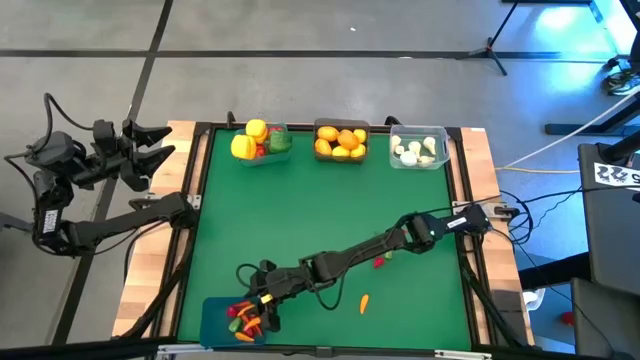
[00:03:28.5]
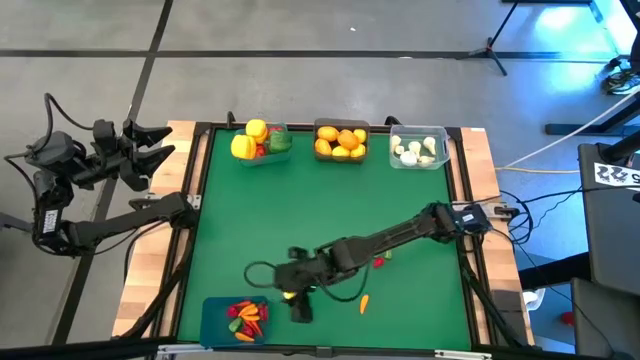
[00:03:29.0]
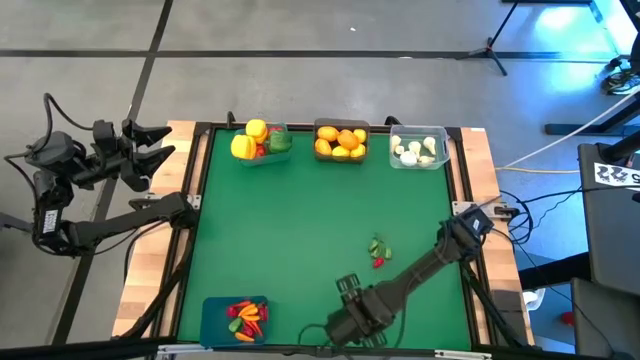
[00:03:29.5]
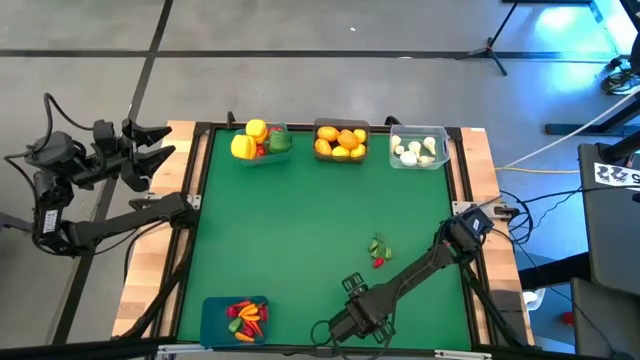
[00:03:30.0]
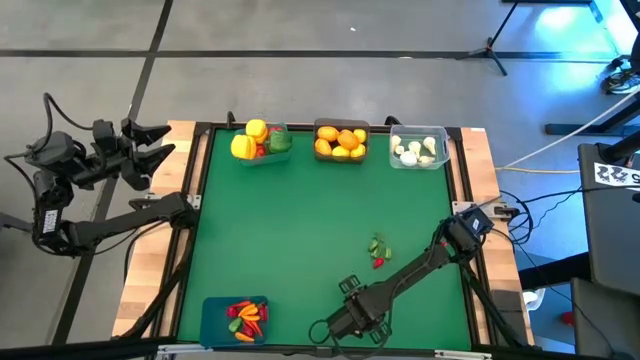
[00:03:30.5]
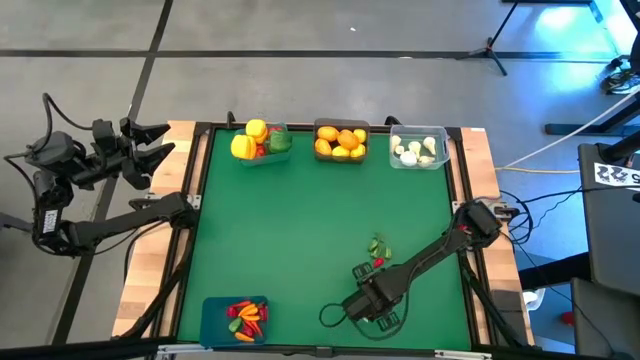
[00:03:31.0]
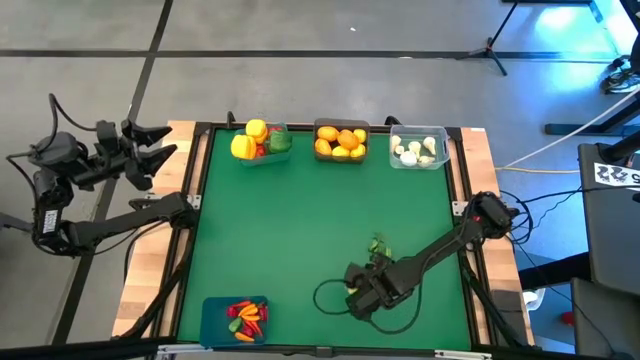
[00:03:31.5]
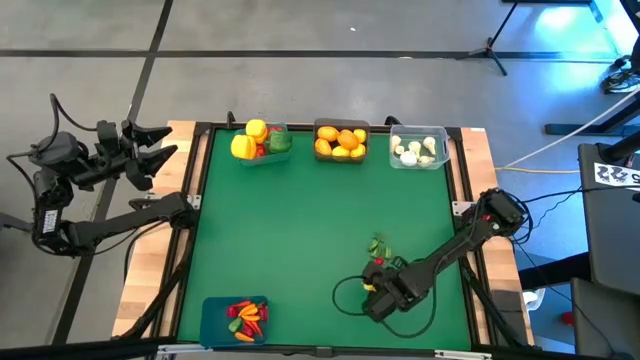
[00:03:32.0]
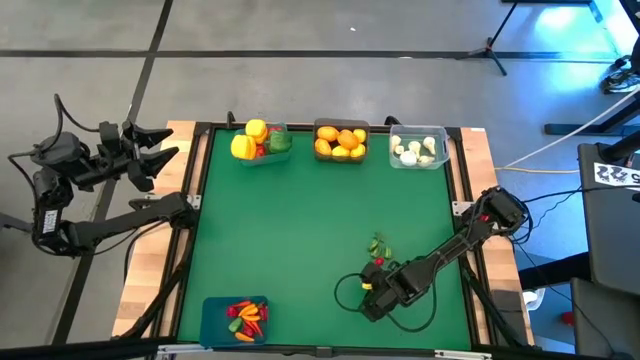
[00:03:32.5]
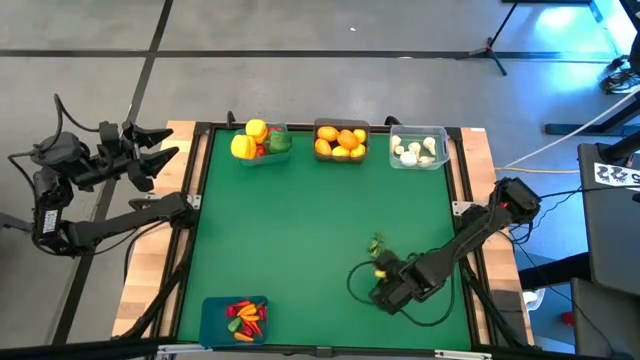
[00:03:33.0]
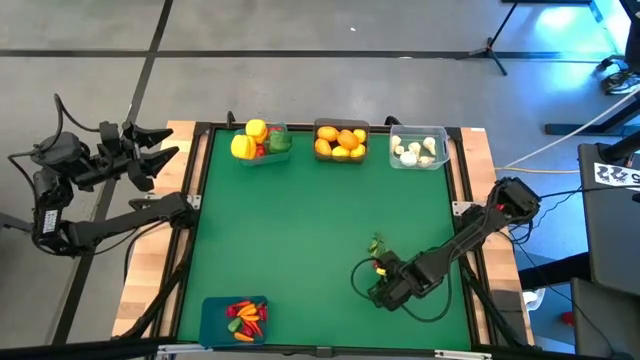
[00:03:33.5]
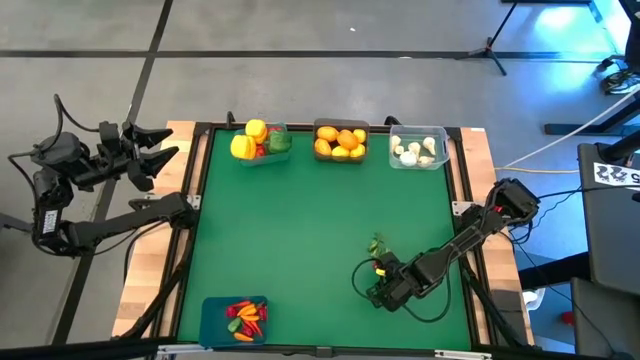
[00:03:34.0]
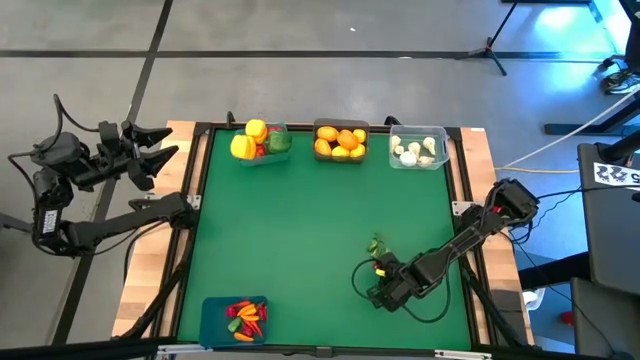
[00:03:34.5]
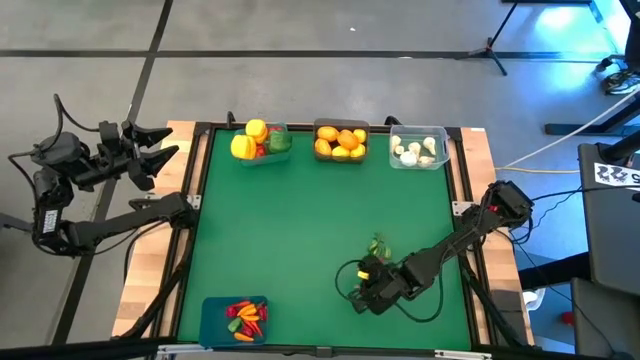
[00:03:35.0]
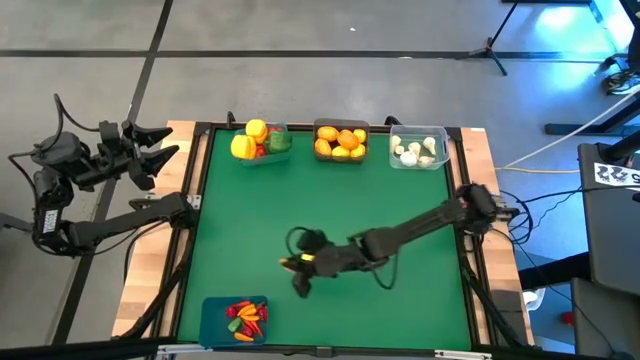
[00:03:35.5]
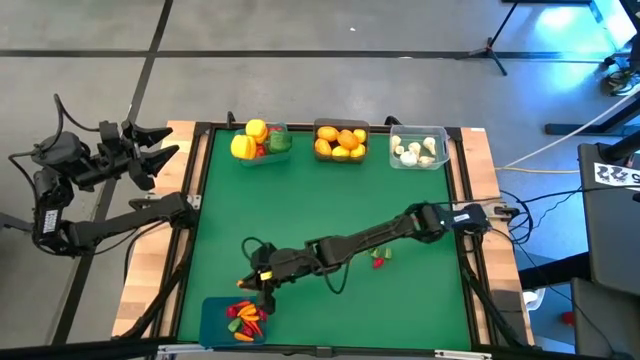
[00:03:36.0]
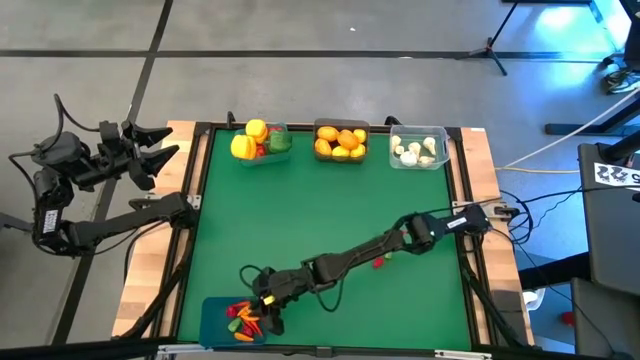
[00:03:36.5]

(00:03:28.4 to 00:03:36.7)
Task: Sort produce into baskets
Put the yellow chili pepper into the dark blue bin

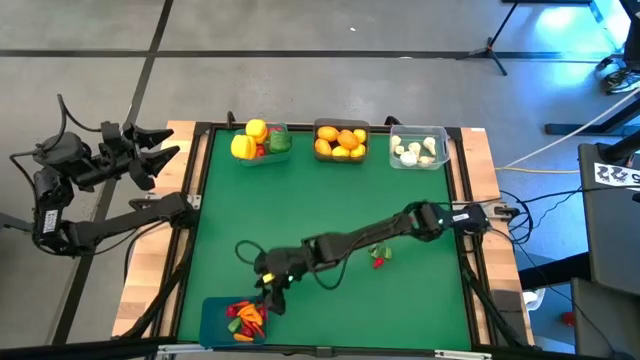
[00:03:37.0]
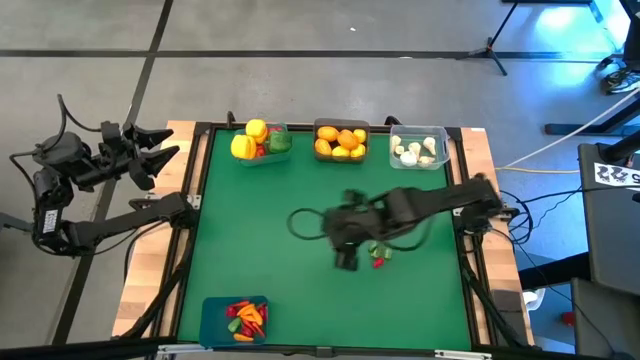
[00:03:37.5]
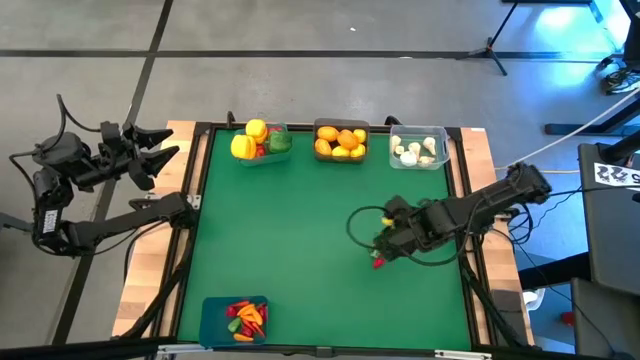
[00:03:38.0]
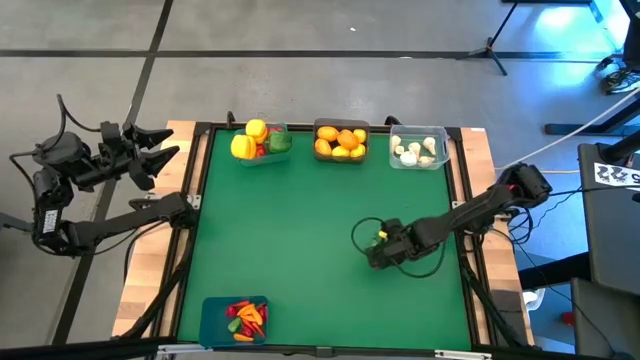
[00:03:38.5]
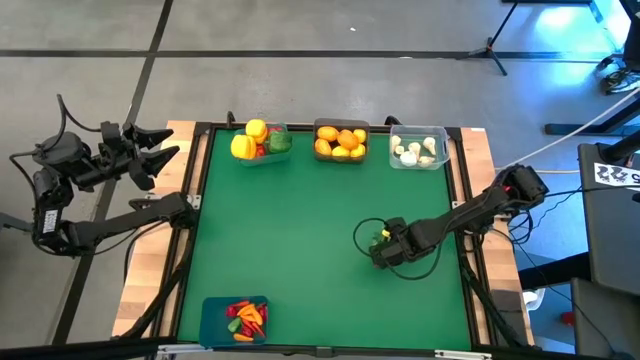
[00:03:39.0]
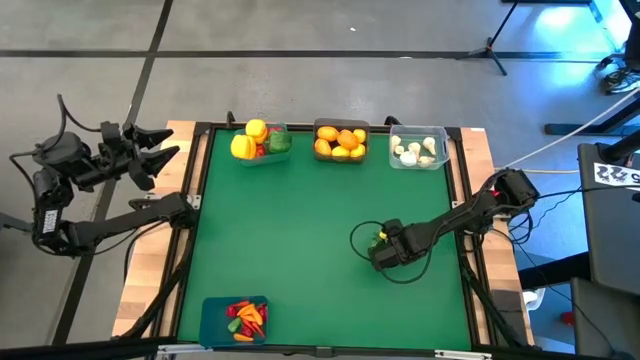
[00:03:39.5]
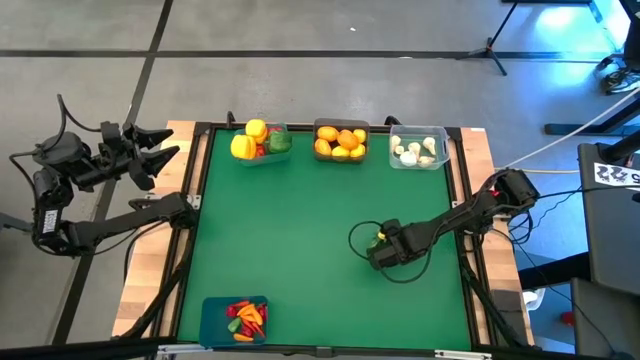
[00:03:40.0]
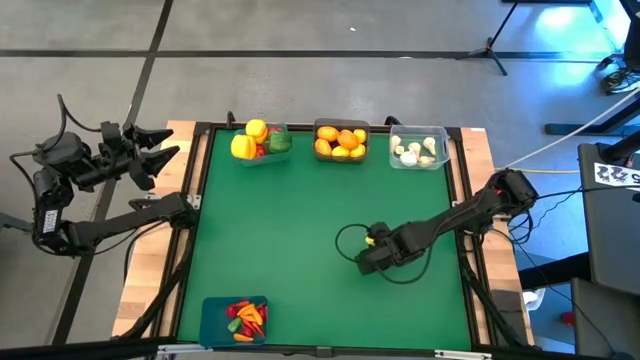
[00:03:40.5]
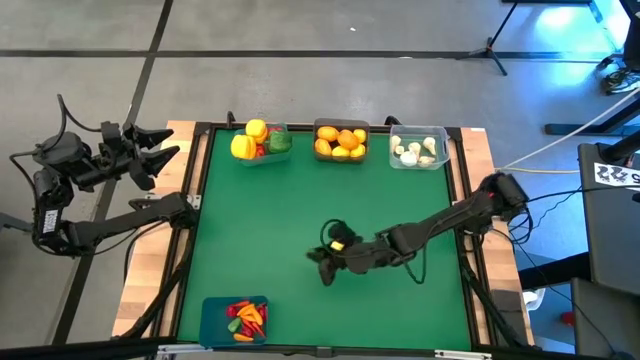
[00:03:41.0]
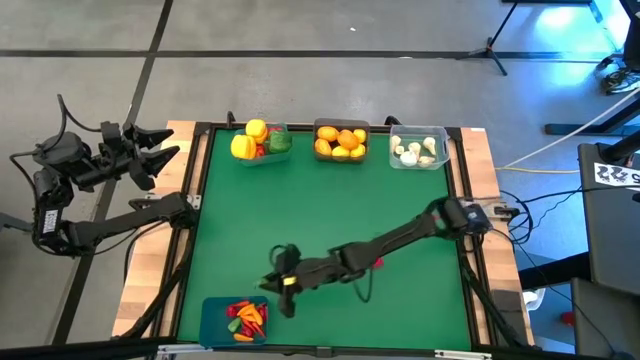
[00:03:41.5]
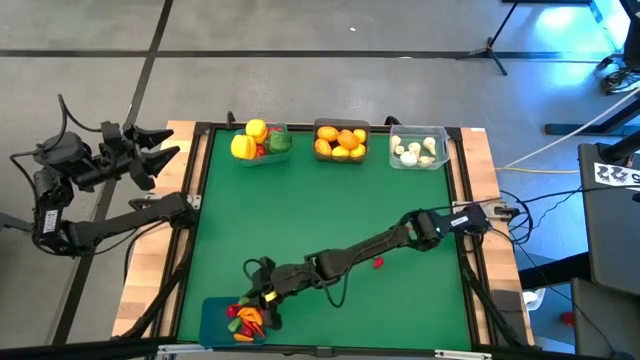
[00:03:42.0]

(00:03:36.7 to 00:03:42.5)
Put the green chili pepper into the dark blue bin

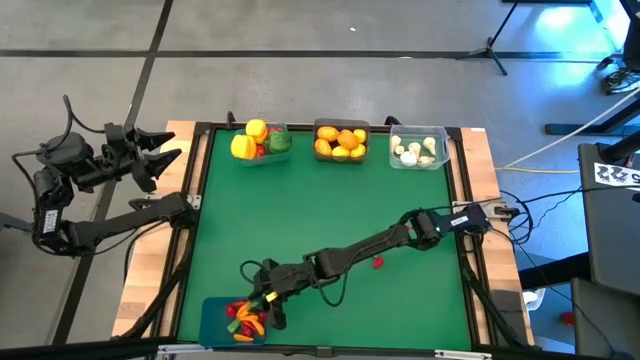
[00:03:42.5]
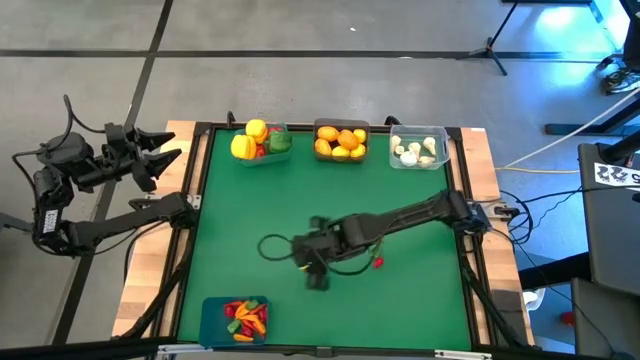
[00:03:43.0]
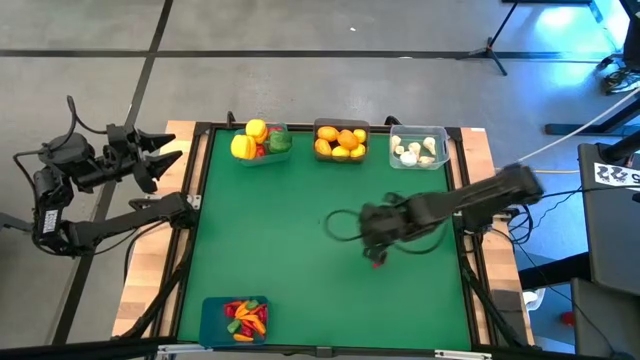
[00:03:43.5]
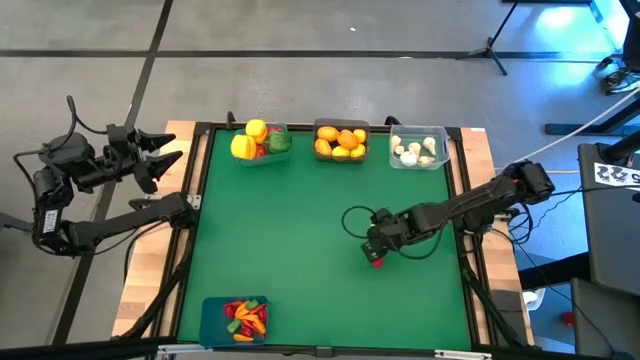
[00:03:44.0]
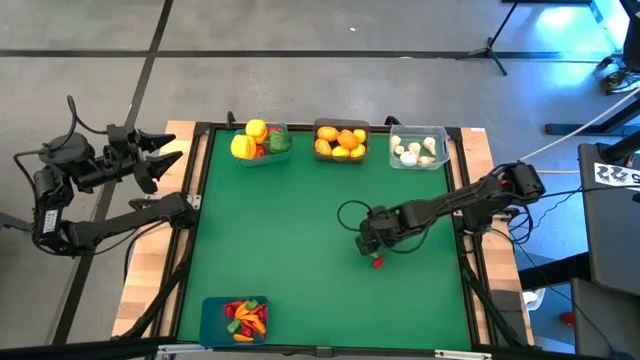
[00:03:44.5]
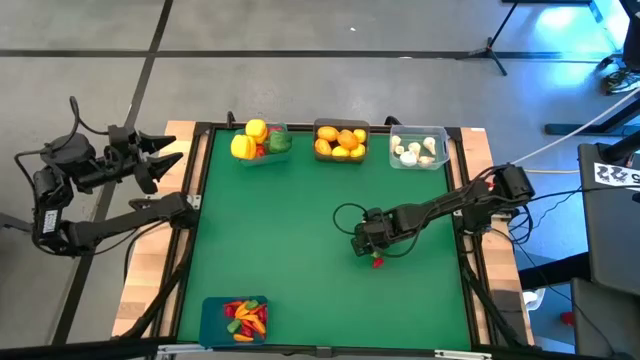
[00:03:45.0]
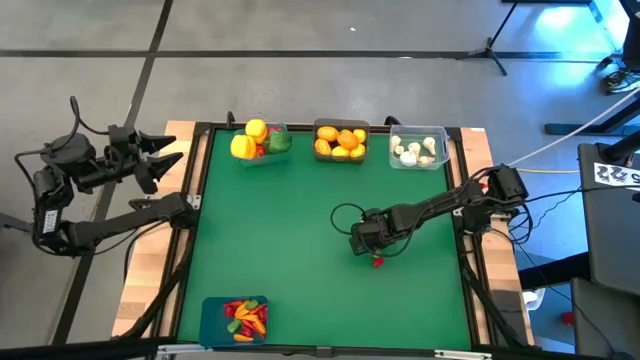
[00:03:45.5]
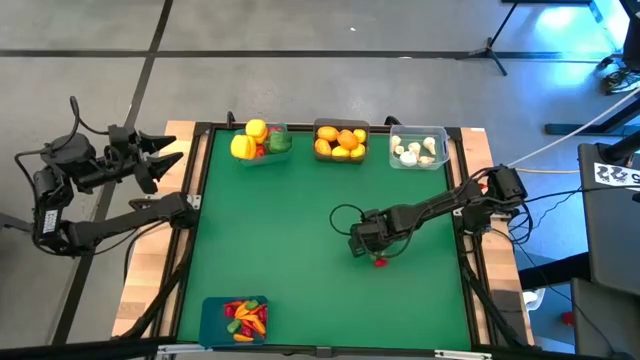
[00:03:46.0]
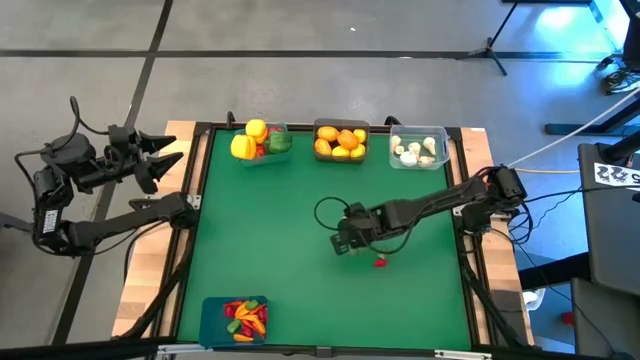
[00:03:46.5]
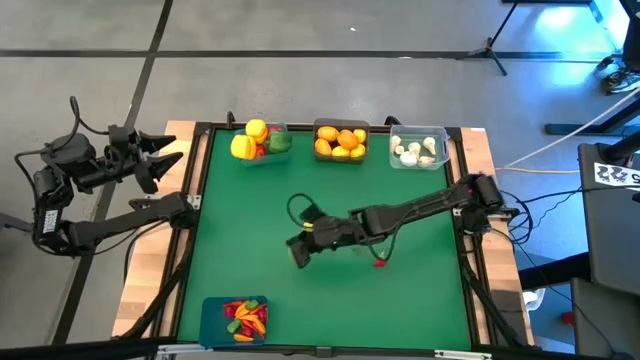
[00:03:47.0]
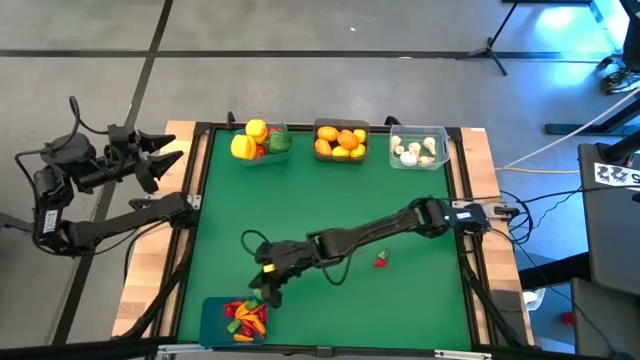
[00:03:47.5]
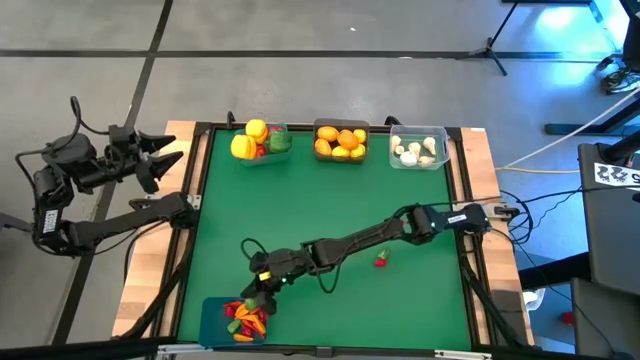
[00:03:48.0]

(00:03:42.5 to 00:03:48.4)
Put the green chili pepper into the dark blue bin

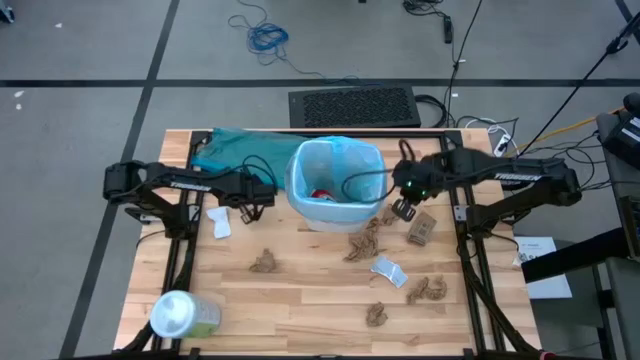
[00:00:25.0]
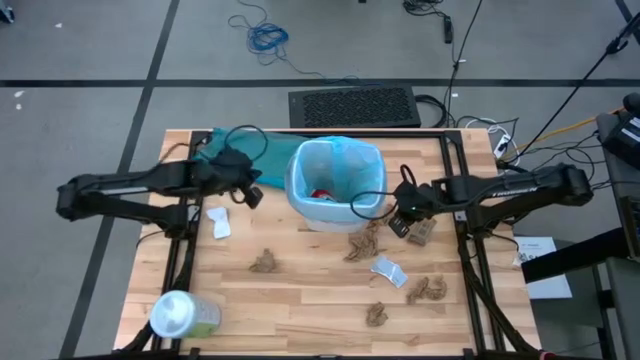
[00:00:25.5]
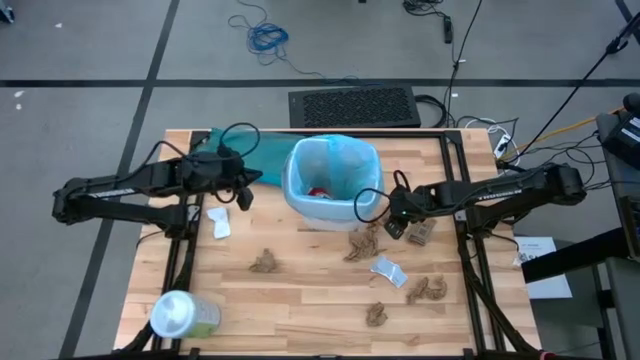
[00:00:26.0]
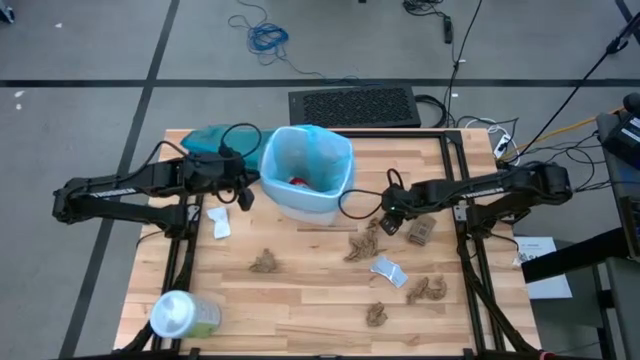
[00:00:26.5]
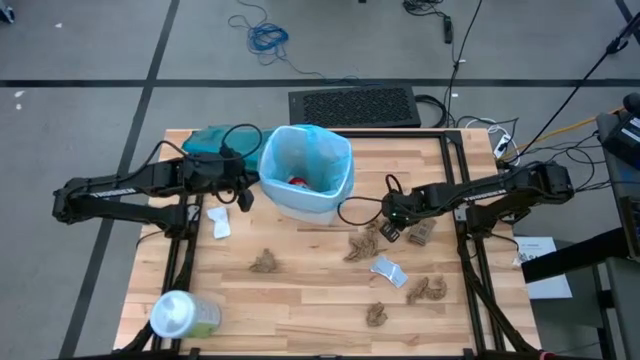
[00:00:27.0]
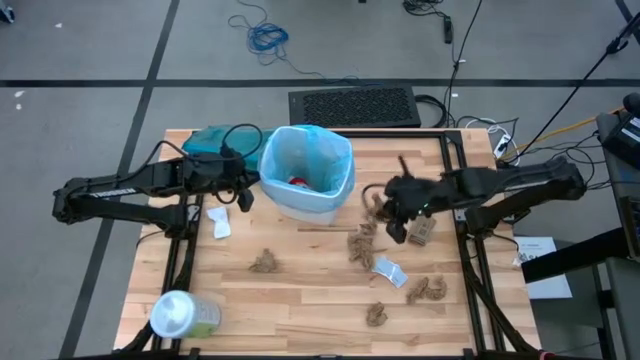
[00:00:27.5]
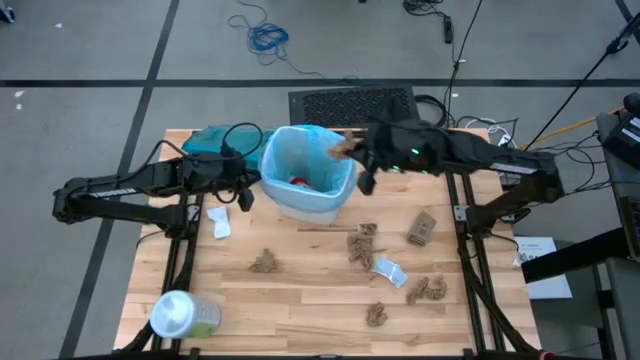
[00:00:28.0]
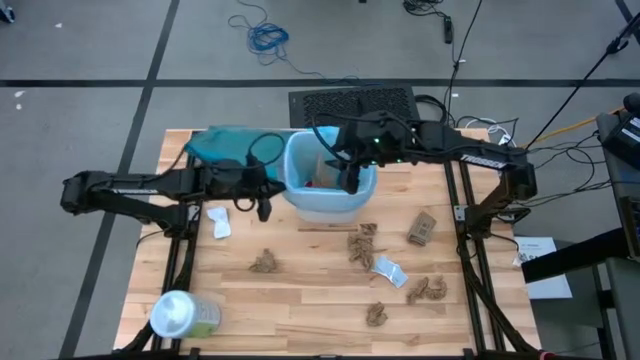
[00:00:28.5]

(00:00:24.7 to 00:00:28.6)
Task: place trash/remove bag and relplace
Put the brown napkin into the trash bin
